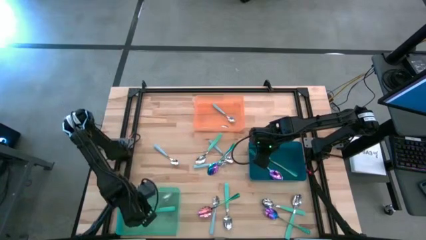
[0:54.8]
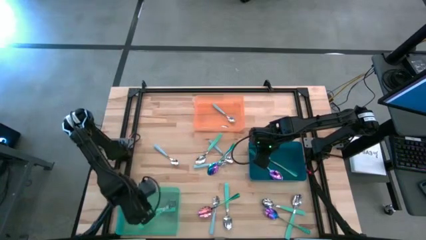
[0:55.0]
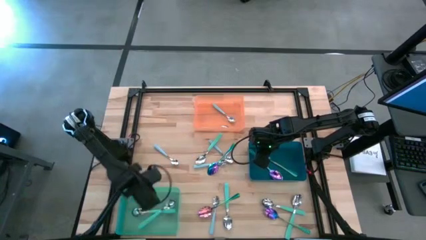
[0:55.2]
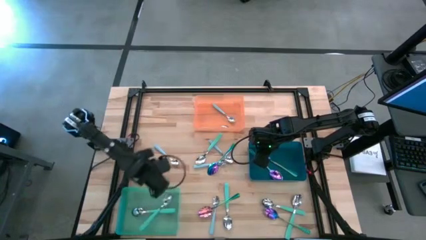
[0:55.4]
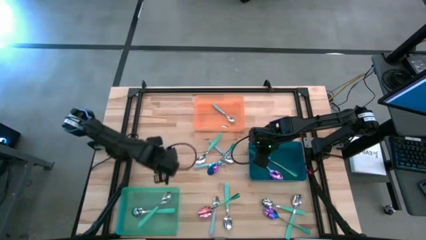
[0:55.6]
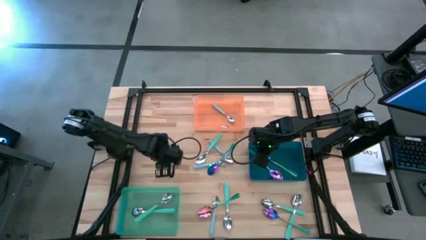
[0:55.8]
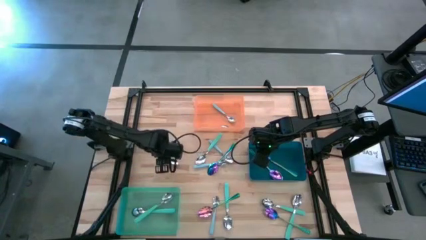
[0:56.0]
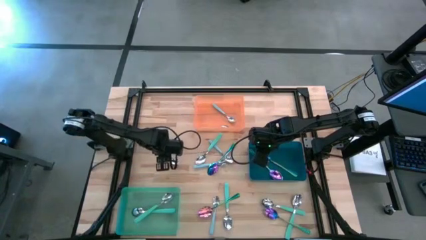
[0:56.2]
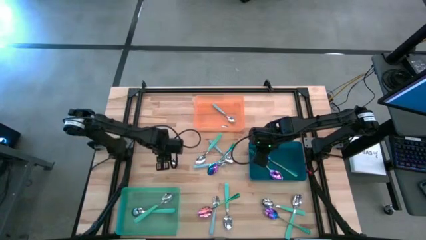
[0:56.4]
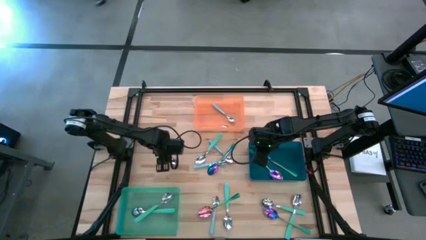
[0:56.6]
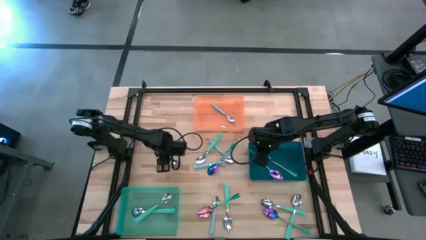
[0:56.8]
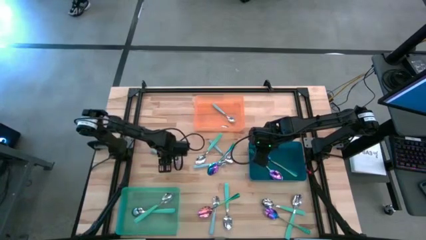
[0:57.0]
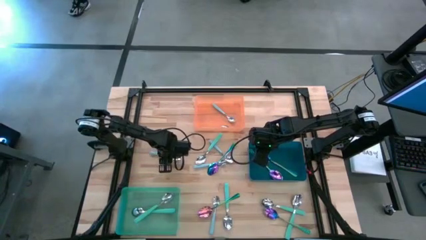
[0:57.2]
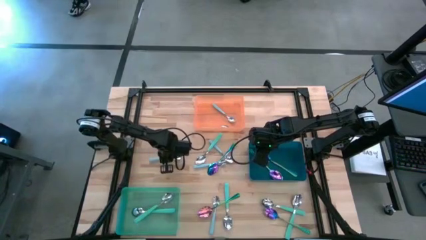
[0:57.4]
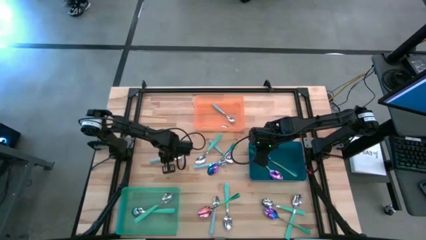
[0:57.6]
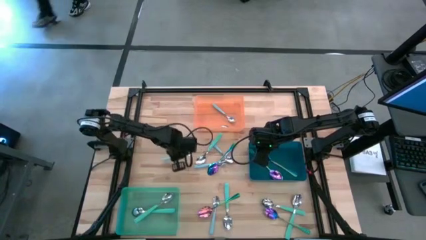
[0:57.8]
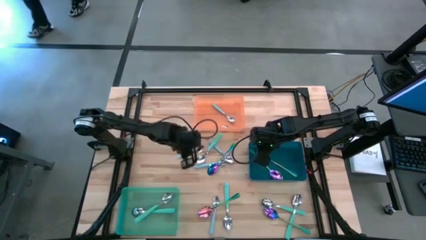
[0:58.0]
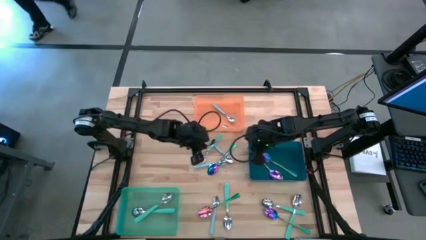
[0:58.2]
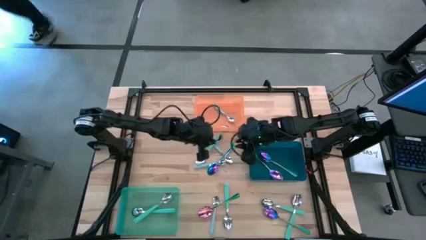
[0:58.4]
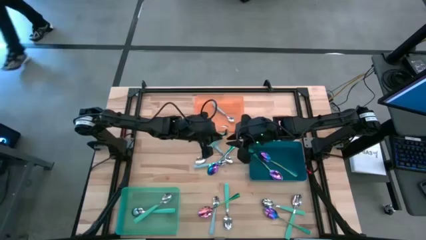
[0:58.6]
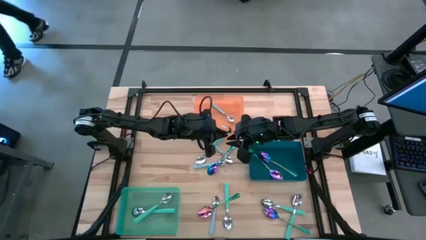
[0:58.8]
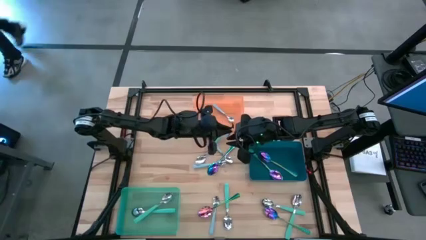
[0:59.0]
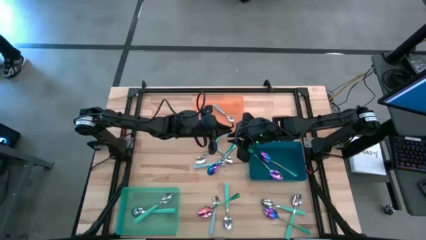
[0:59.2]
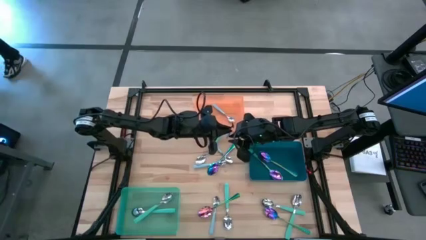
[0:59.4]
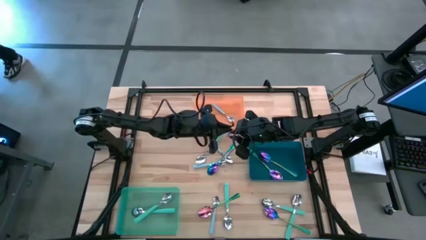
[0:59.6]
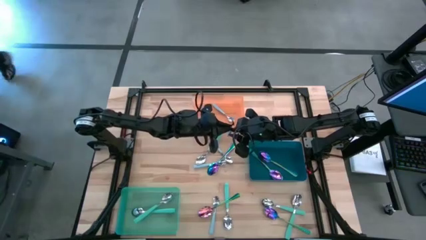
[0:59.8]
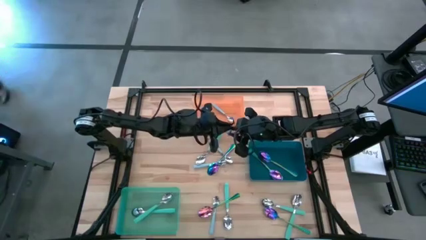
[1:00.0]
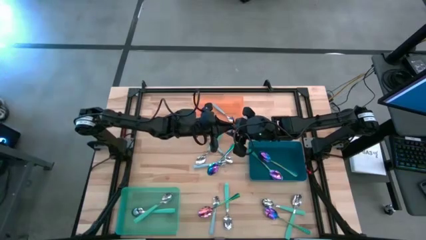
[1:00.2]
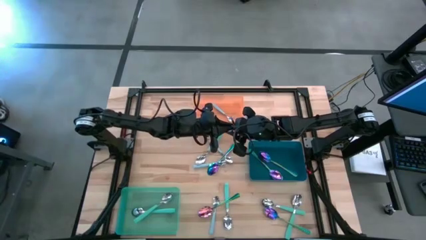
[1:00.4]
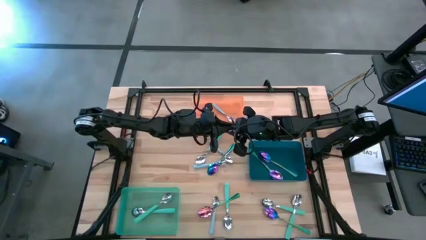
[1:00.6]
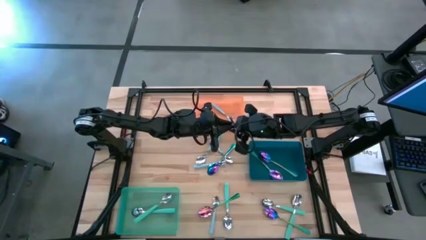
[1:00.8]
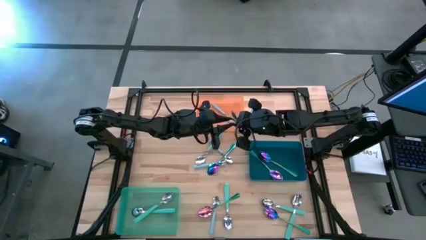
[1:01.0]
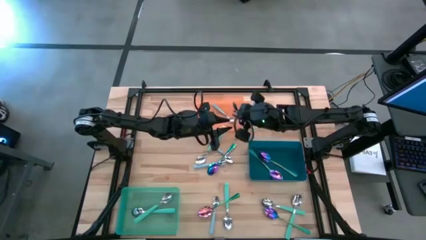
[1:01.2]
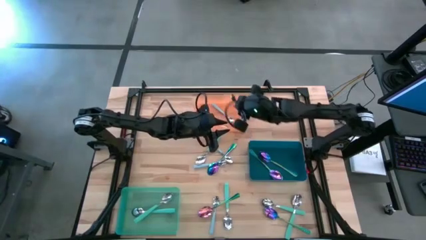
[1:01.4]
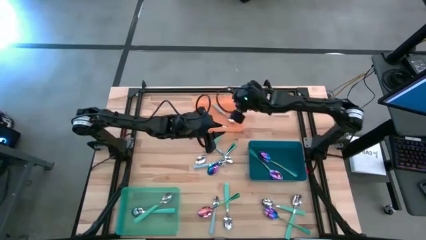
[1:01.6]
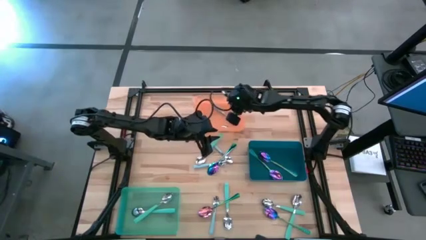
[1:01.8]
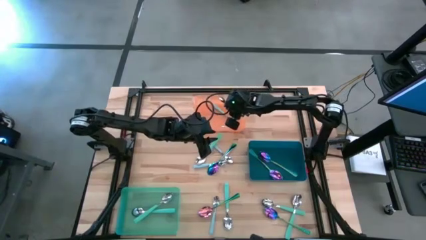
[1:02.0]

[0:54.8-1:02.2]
Task: Sort silverware by color (type)
Put the blue spoon into the orange bin

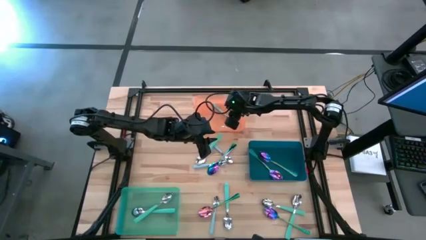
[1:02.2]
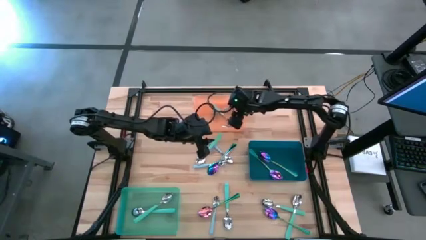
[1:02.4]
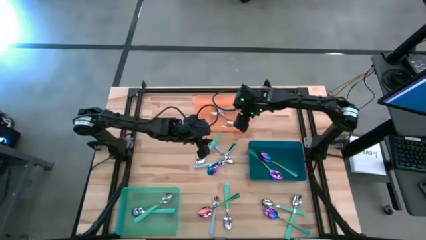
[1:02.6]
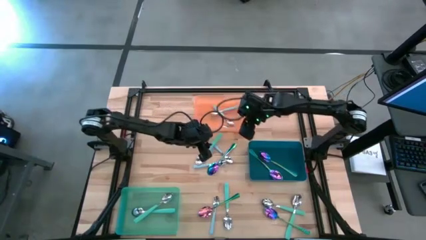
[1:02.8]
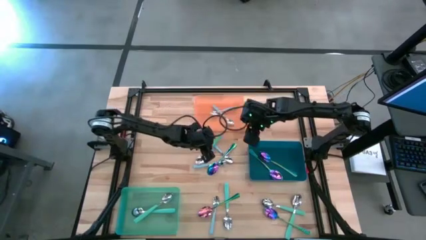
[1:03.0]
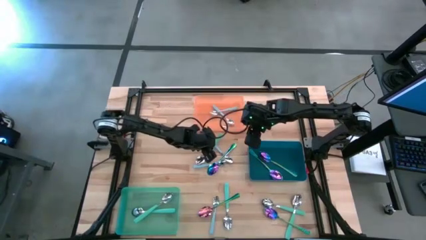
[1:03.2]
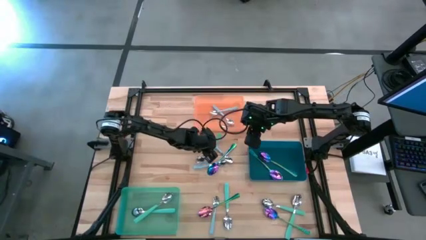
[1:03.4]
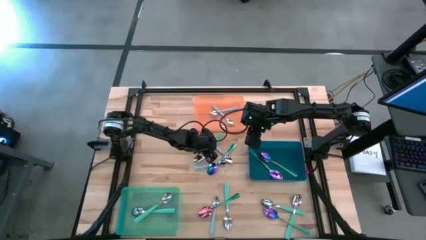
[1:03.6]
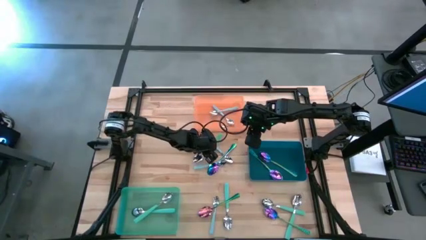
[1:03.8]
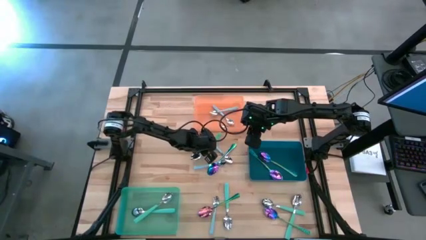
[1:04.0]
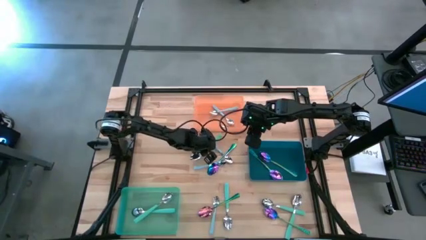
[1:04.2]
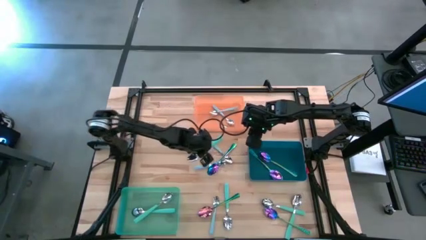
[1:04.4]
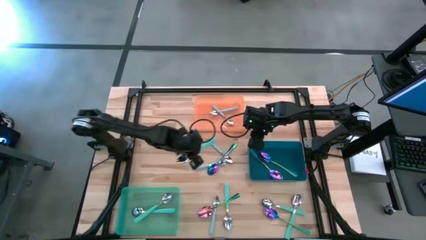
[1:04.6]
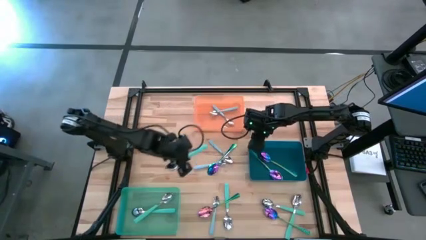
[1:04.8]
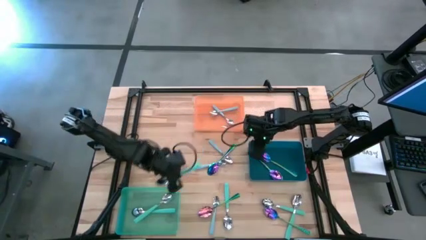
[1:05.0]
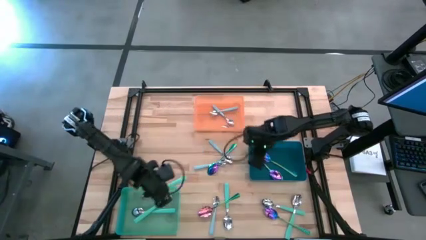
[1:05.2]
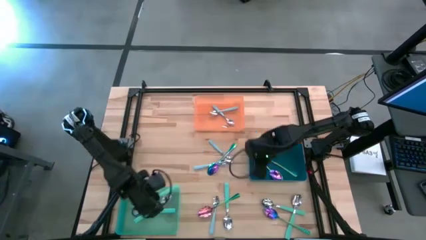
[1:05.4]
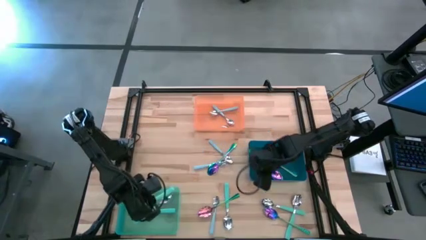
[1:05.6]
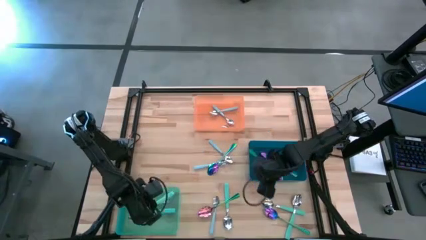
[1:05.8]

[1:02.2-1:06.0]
Put the green spoon into the green bin

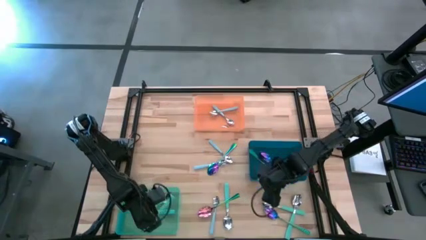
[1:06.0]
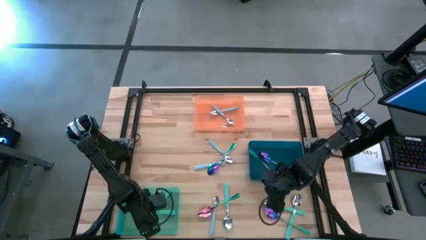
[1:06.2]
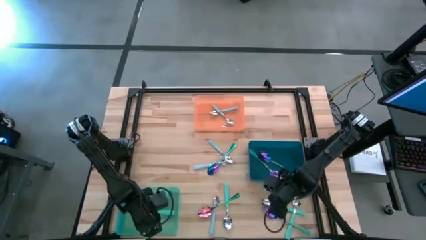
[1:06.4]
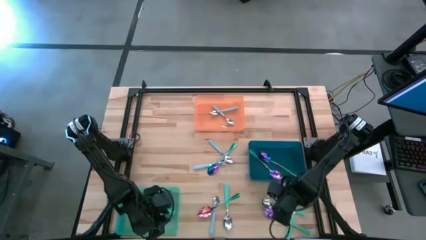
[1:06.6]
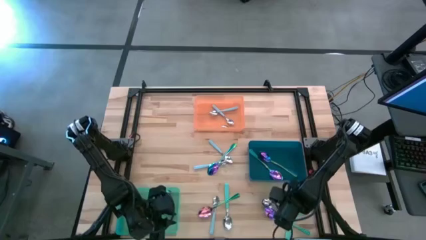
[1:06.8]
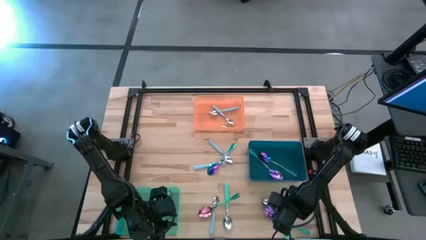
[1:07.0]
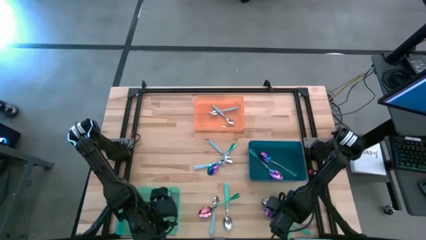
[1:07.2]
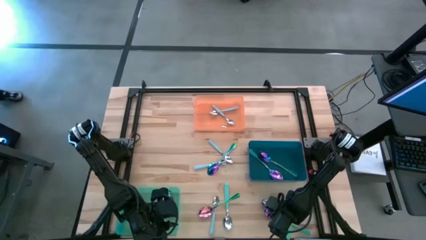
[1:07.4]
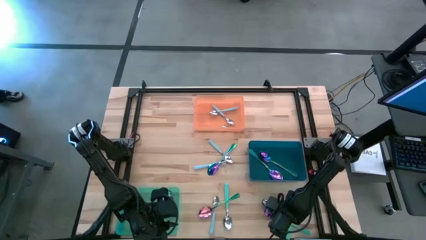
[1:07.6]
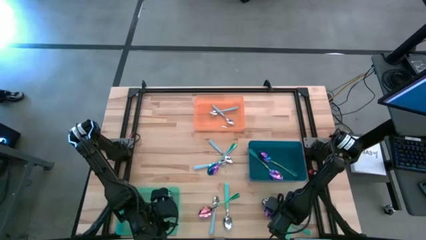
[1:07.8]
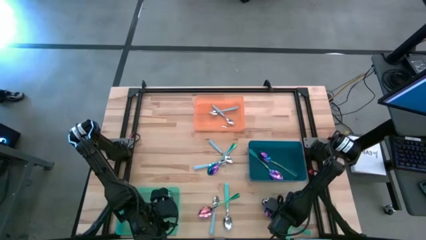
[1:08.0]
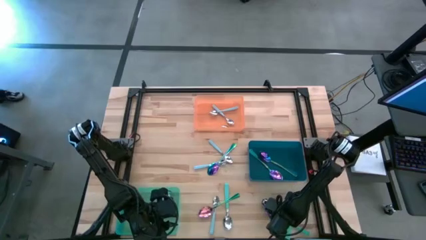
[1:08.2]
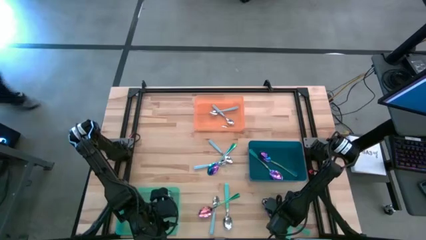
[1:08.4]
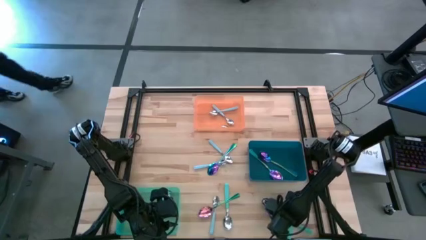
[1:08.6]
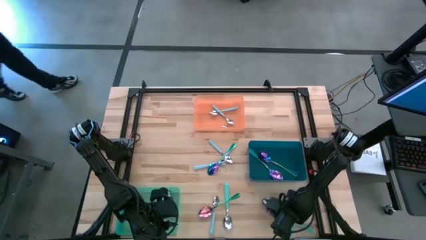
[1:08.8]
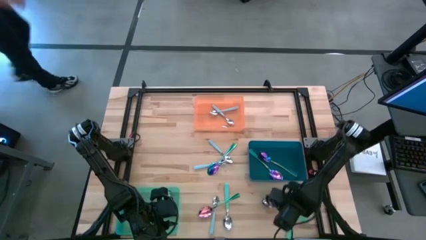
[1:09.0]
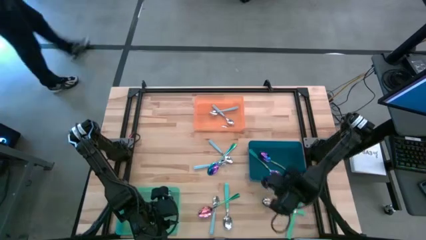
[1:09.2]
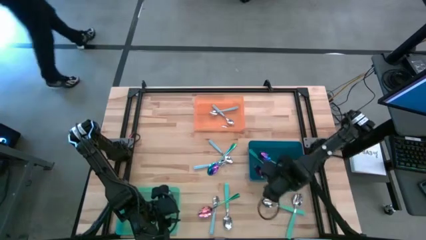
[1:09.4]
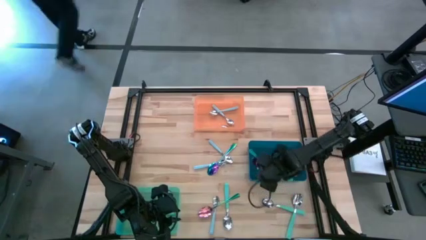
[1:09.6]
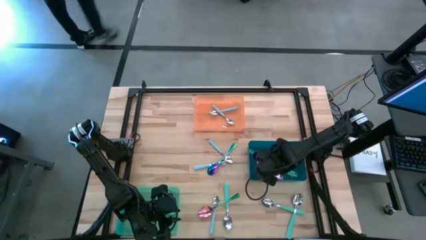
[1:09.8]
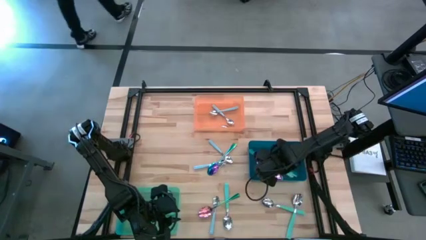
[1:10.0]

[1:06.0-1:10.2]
Put the purple spoon into the blue bin
